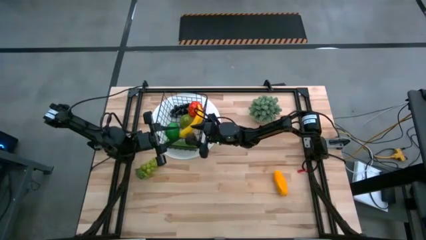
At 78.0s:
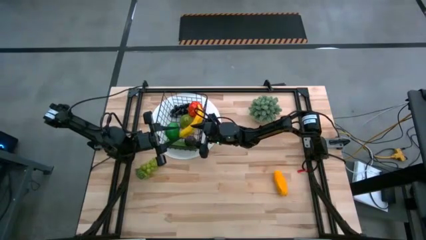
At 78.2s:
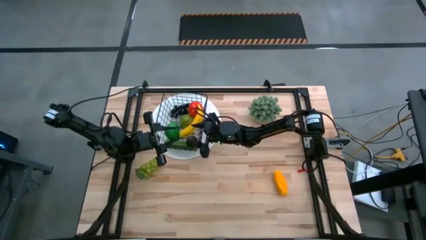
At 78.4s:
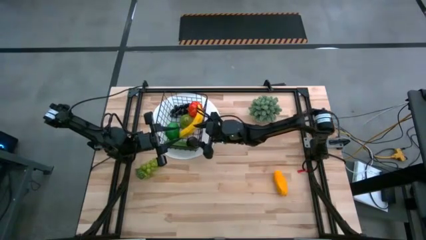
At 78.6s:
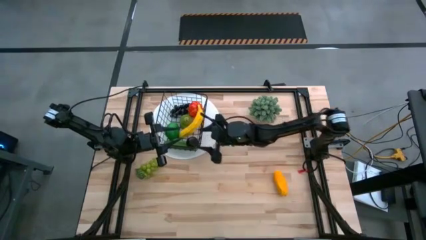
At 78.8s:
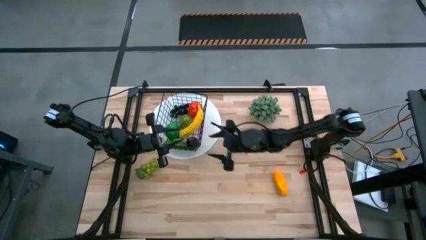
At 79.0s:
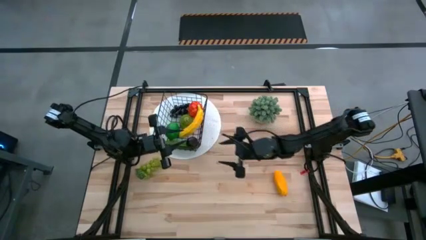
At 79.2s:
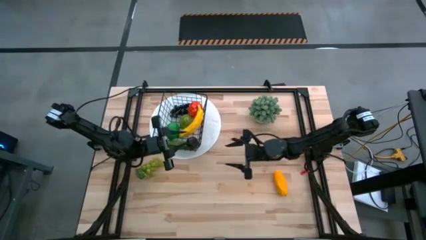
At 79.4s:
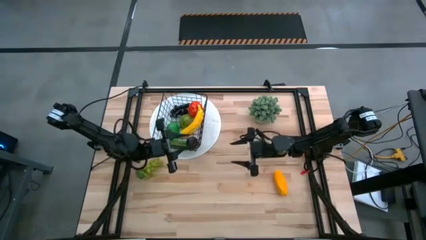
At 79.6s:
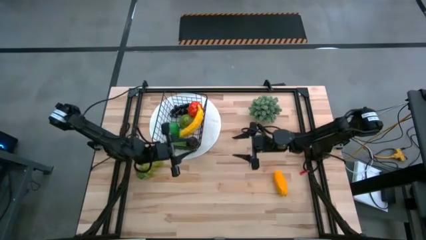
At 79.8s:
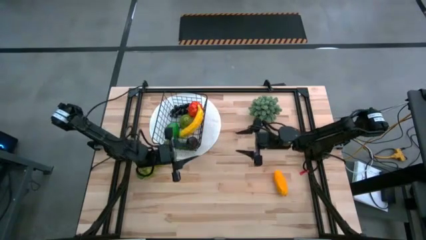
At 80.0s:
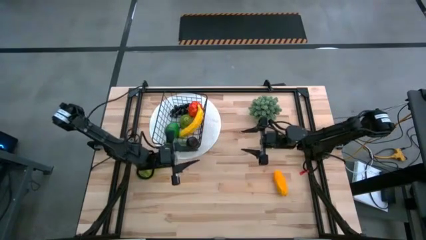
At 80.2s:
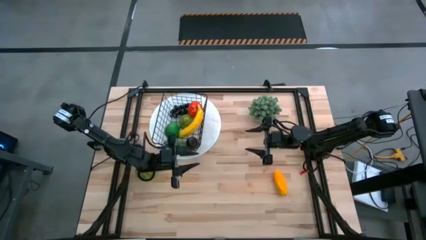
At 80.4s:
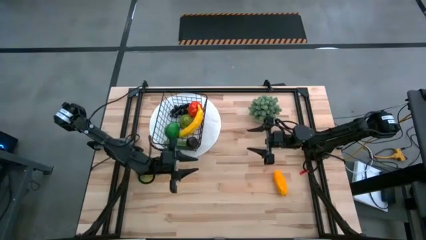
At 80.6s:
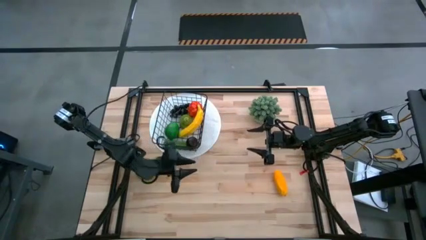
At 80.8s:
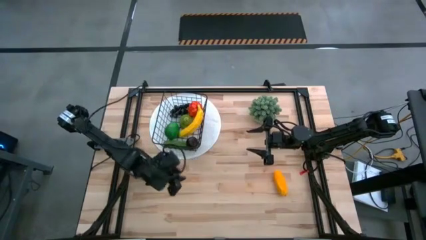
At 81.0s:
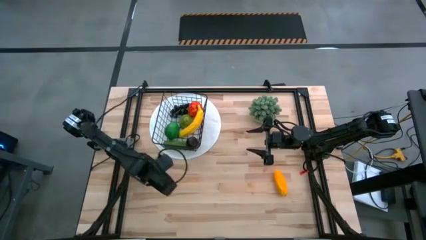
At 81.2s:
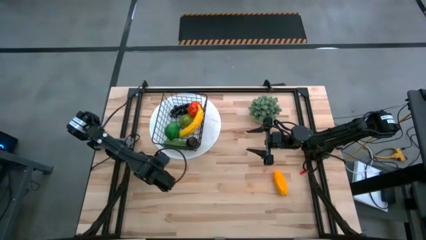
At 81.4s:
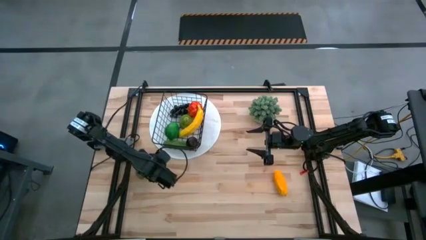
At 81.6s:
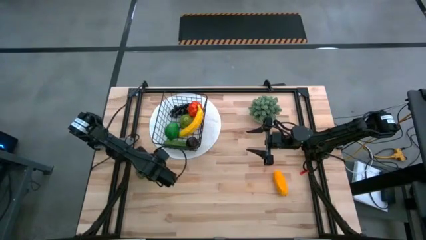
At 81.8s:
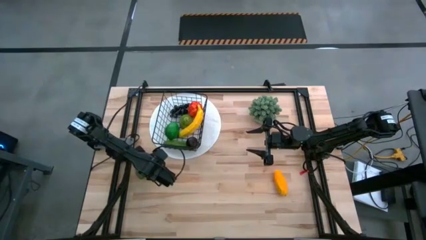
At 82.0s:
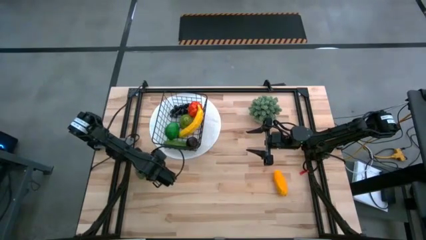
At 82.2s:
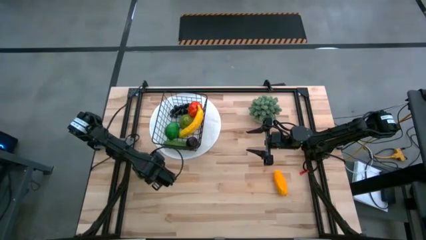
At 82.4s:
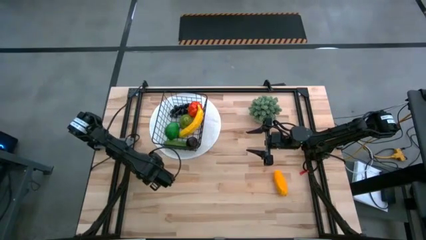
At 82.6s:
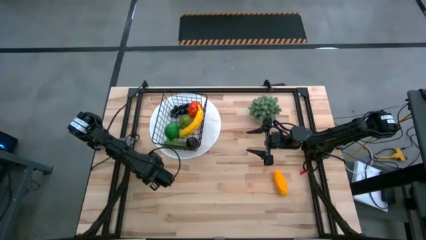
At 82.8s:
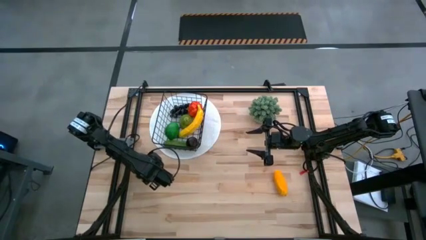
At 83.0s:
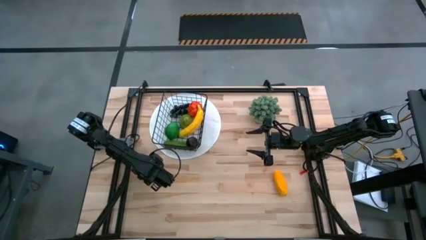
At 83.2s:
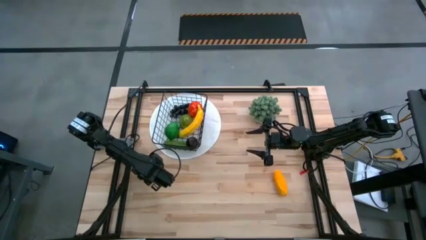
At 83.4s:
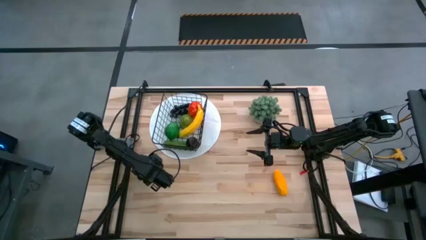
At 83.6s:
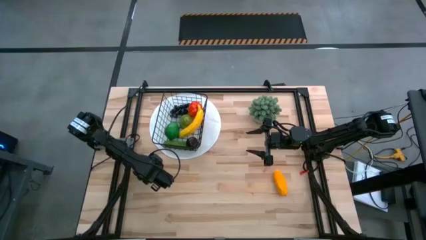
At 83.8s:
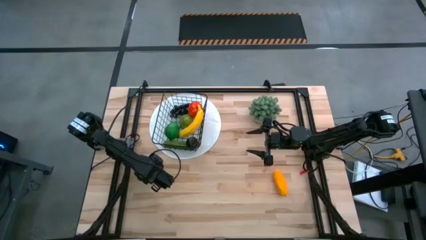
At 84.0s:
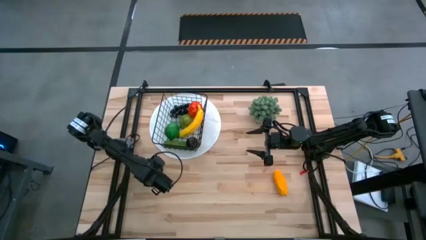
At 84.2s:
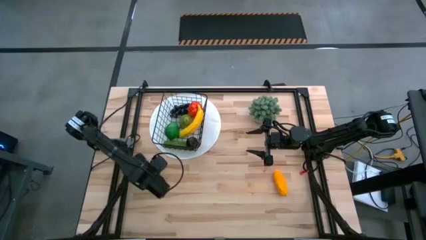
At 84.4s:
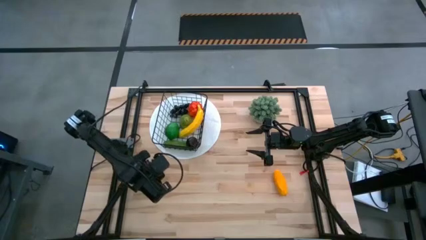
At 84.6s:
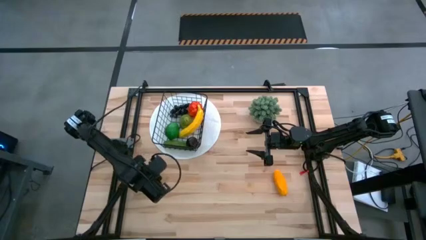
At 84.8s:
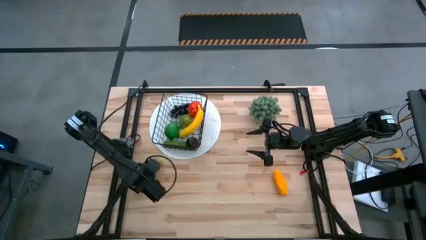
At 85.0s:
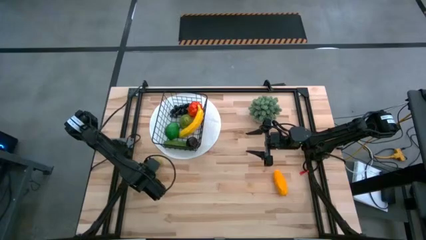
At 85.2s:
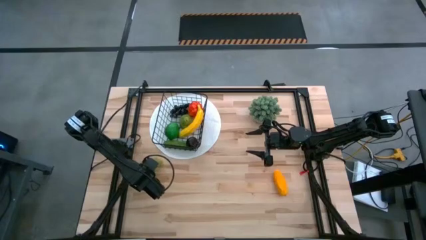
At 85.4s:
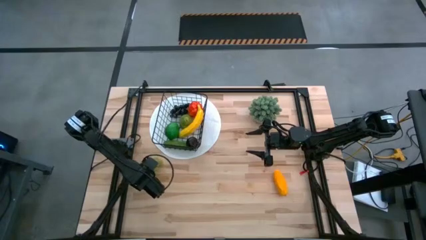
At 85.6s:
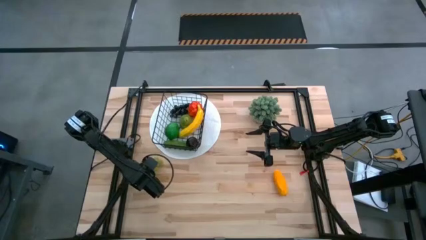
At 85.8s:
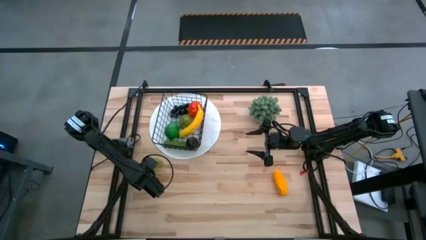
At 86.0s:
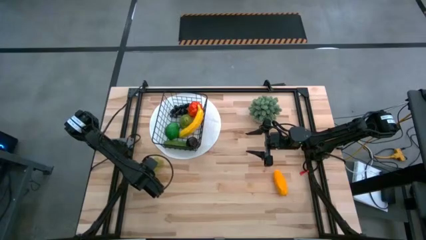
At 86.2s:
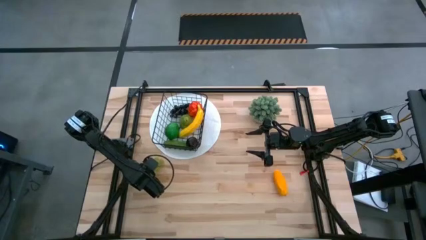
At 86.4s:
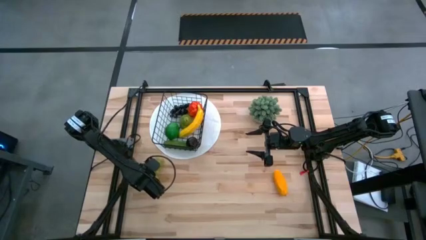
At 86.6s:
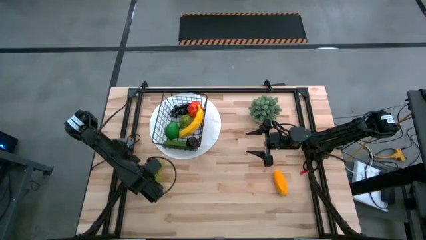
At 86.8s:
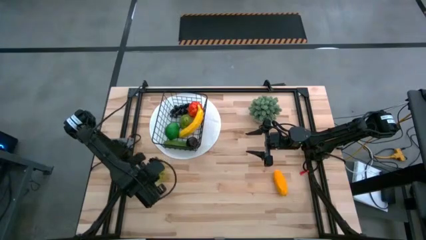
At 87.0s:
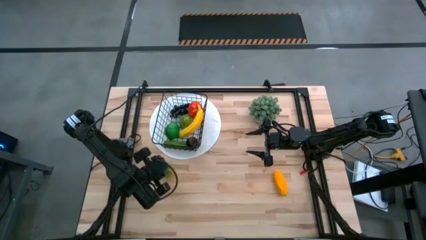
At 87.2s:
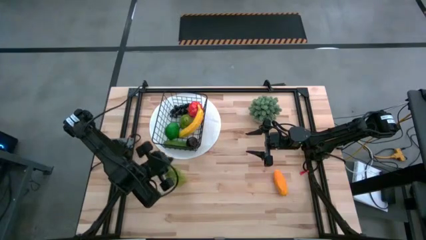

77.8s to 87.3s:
Task: Build produce basket
Put the green grapes into the wire basket

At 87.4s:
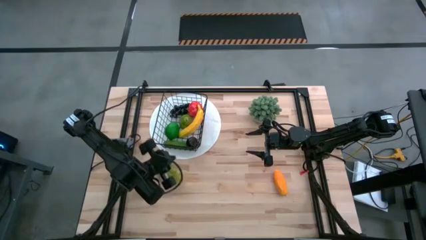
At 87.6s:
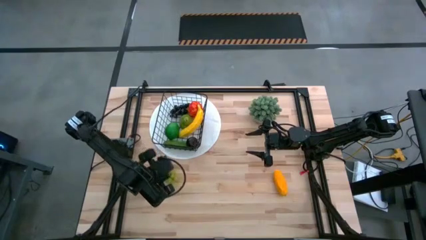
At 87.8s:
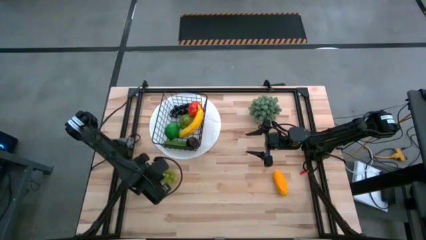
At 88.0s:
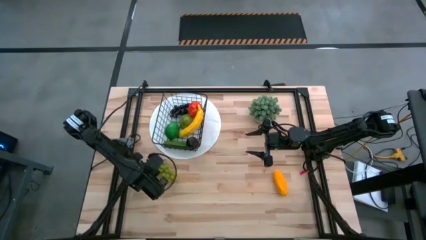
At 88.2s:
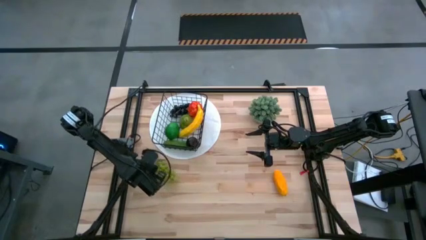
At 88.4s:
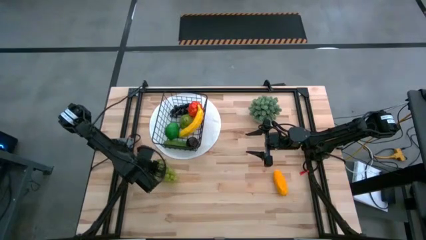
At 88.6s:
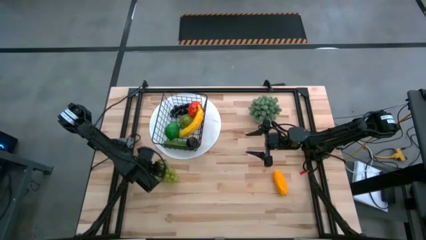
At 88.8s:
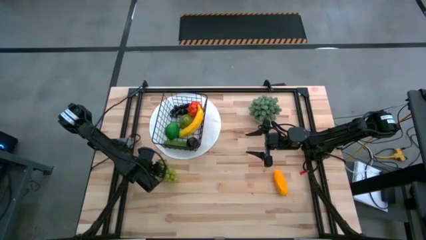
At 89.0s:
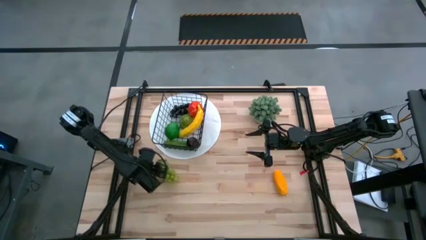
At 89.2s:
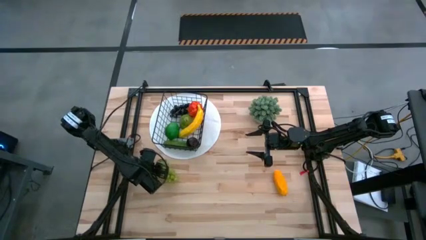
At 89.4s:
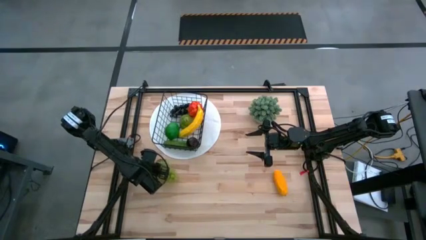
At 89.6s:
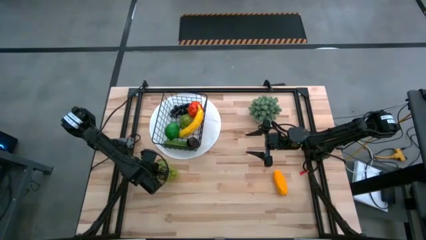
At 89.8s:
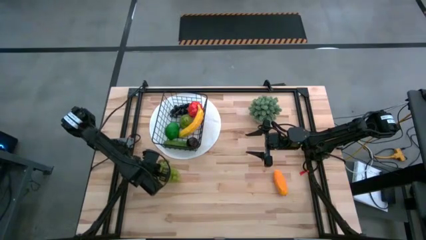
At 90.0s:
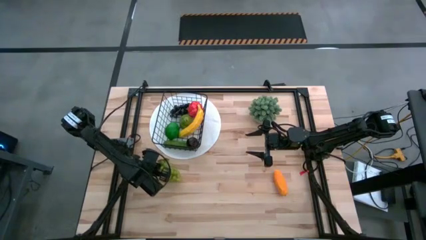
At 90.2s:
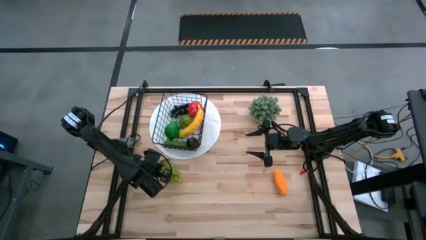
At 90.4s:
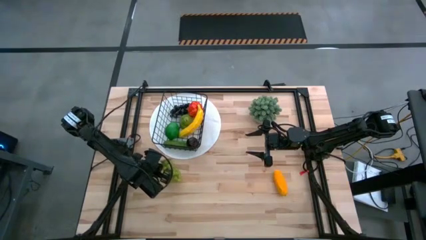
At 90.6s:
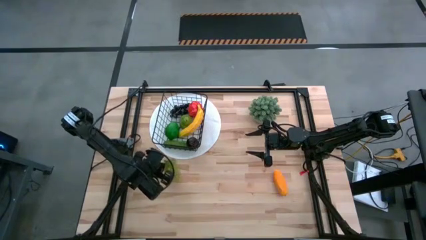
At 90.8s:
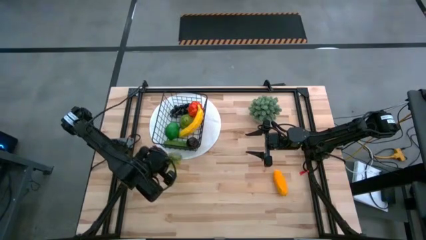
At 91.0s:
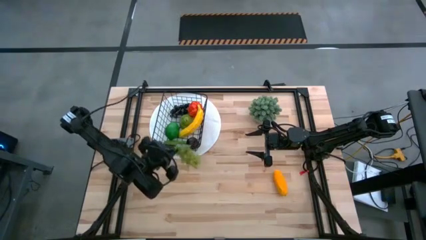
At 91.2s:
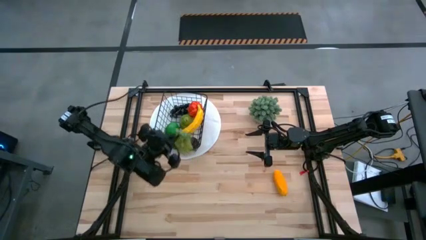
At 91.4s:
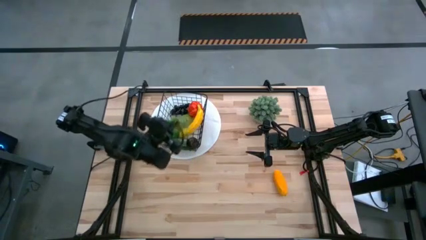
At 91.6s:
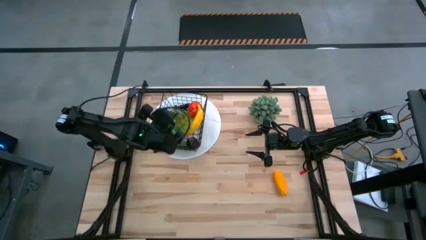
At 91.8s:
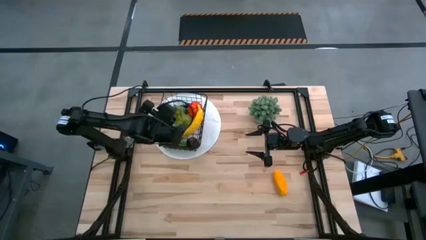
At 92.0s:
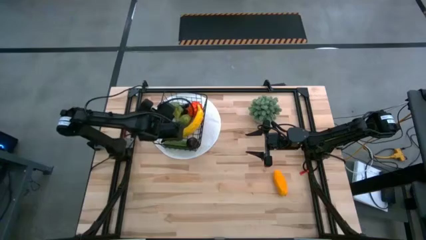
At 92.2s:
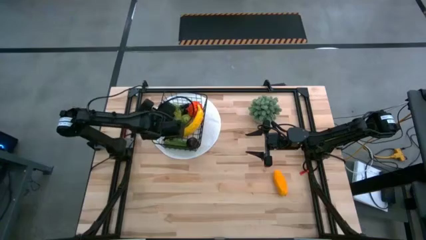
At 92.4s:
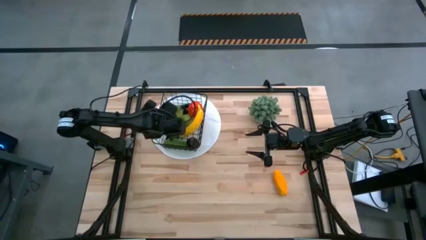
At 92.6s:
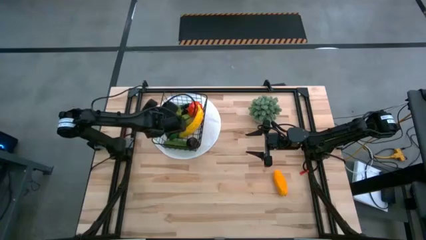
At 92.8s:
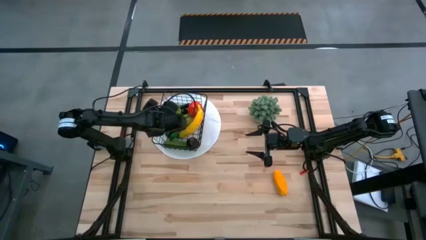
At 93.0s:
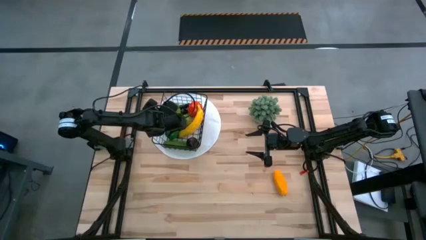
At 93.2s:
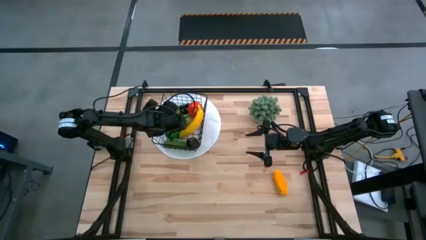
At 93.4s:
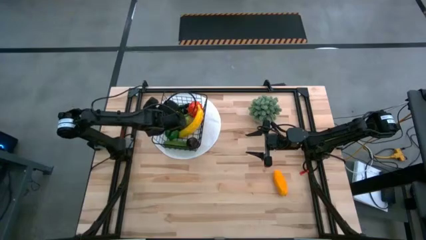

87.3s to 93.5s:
Put the green grapes into the wire basket
